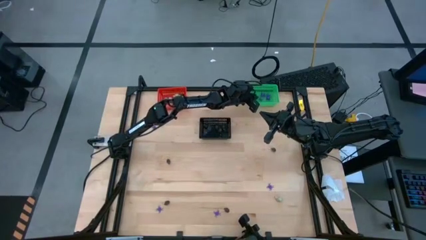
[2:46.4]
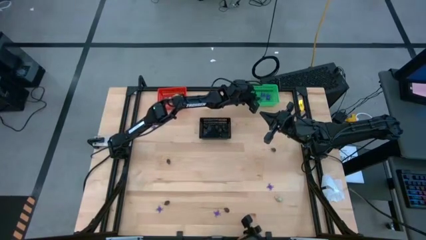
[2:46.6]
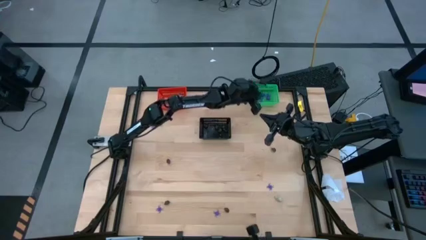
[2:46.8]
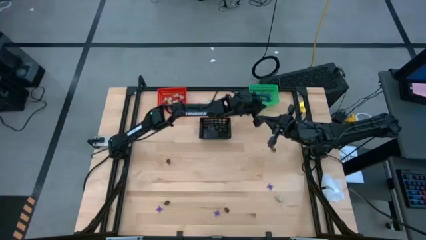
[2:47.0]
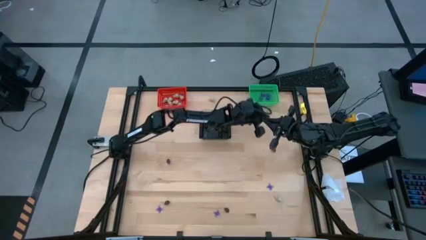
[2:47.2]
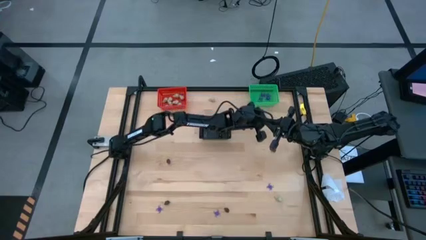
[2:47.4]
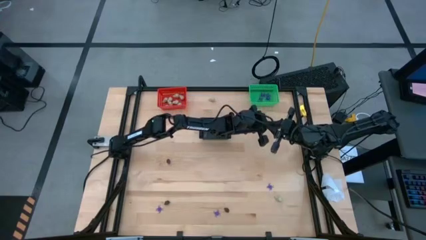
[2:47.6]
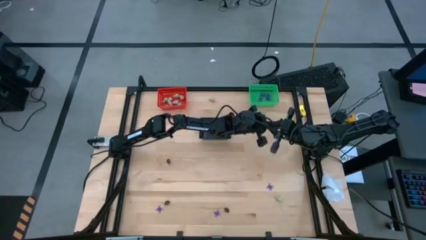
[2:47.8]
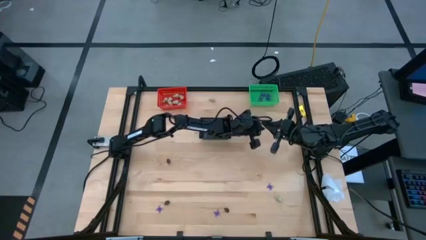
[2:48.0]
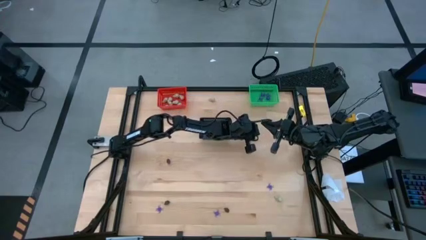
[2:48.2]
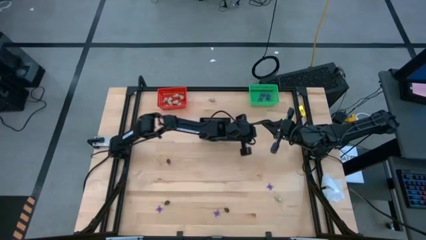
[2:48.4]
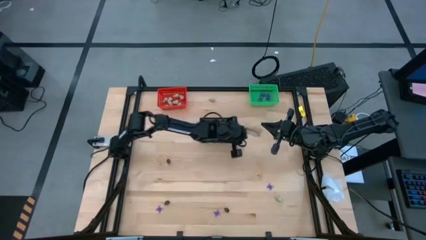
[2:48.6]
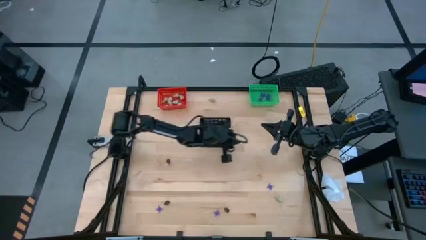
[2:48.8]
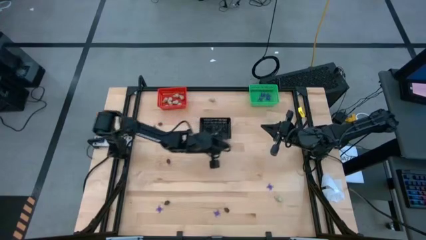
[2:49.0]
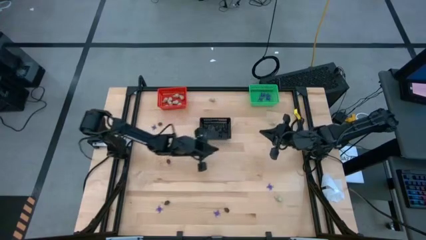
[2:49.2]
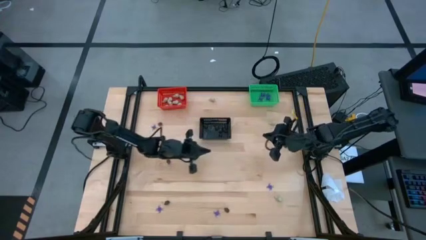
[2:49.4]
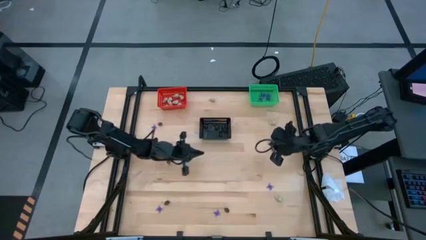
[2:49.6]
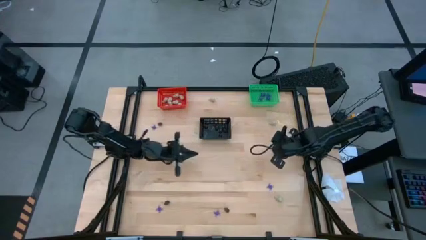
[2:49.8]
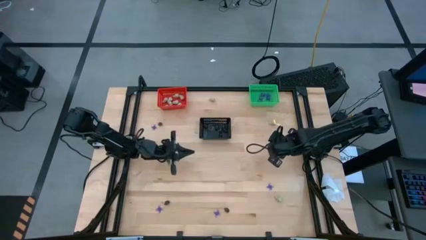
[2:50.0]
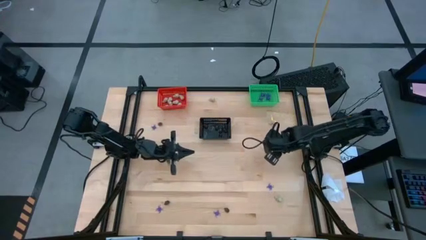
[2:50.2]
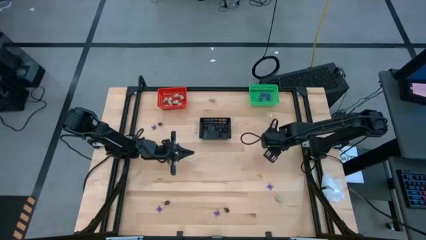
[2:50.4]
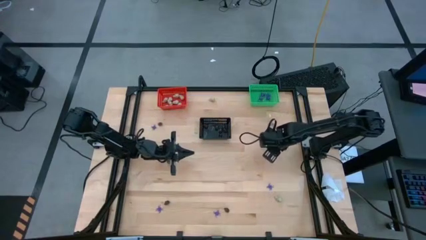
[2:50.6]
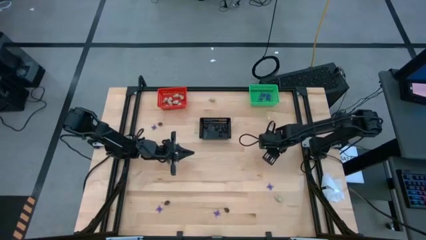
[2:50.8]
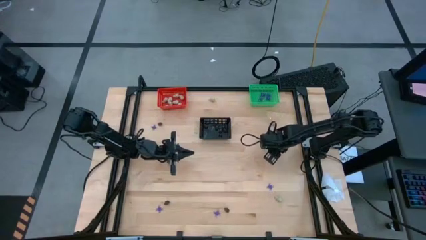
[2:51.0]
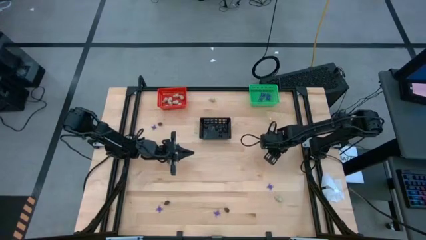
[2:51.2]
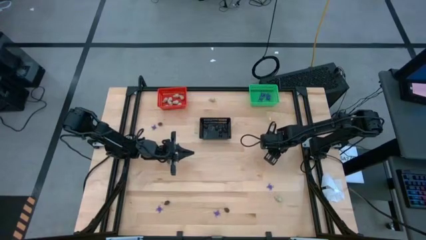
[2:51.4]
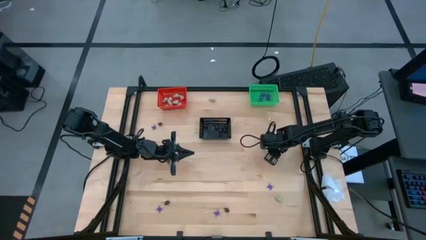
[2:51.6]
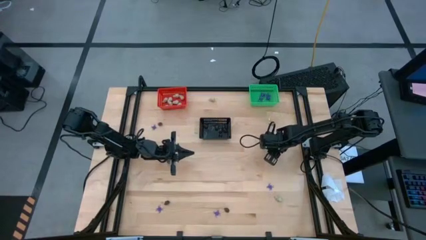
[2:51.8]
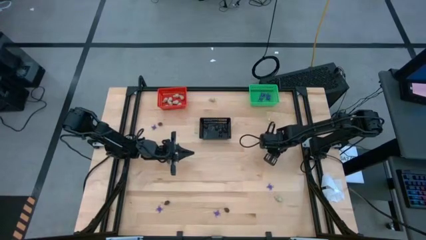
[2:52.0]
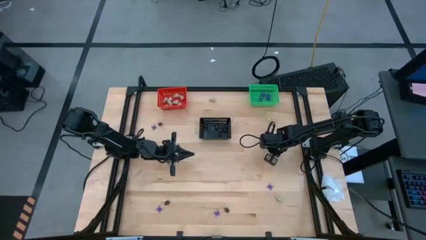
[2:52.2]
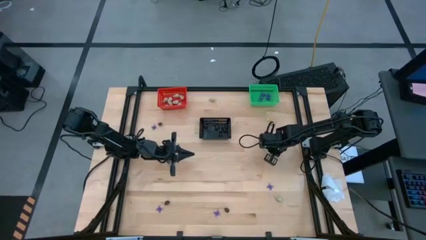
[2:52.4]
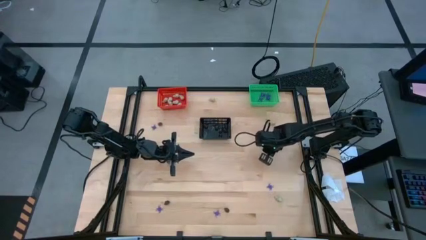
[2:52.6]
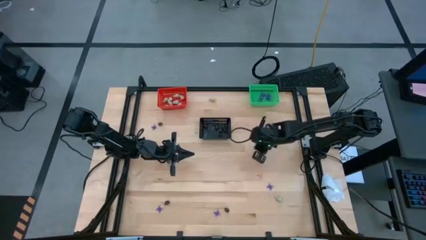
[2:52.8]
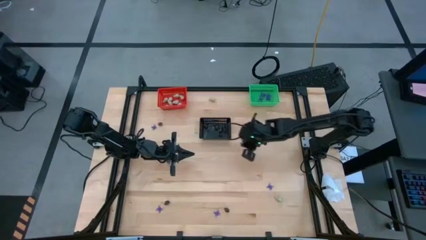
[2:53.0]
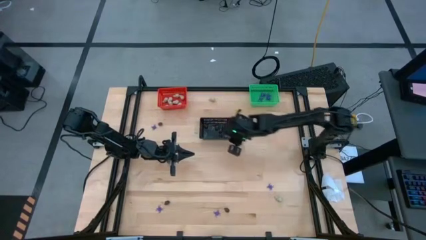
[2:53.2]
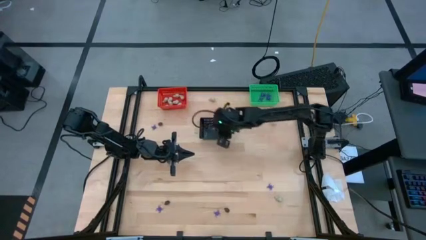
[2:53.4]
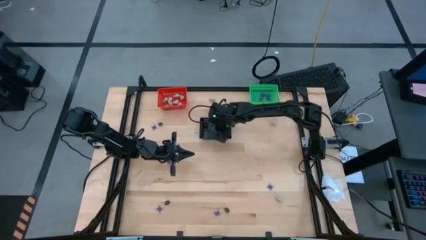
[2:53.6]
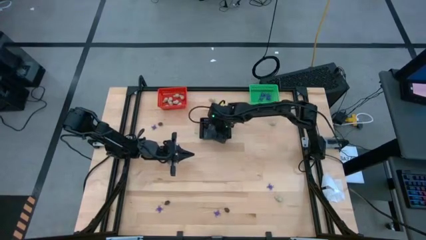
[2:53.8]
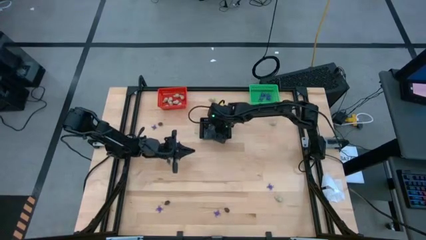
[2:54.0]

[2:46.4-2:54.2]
Task: Sort Halloween decoration
Put the black skull toy into the black bin

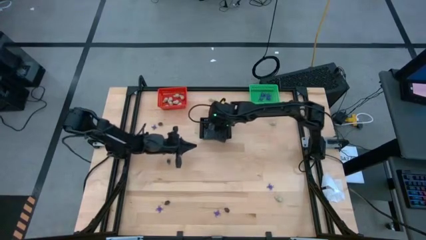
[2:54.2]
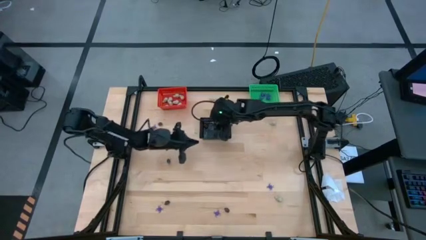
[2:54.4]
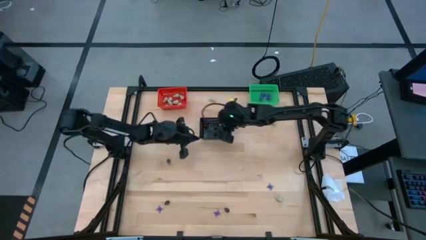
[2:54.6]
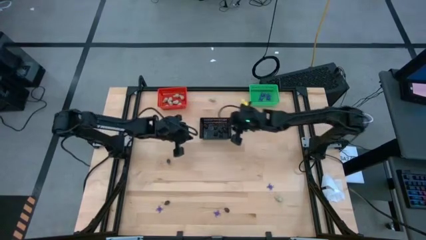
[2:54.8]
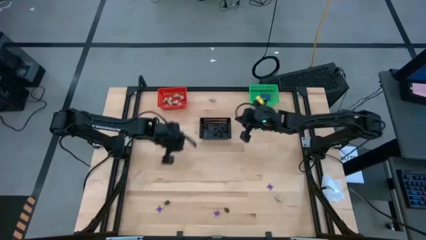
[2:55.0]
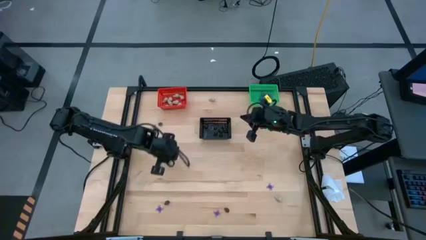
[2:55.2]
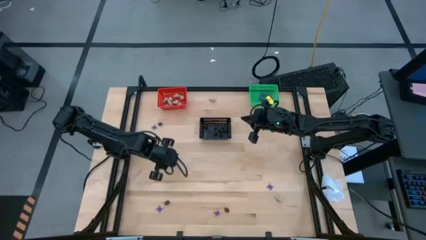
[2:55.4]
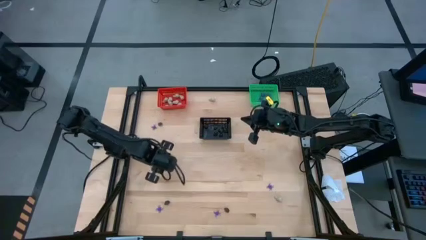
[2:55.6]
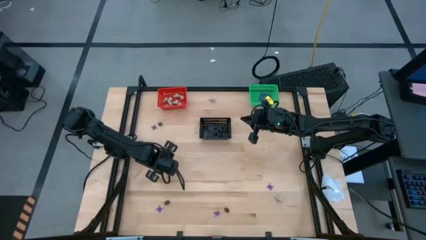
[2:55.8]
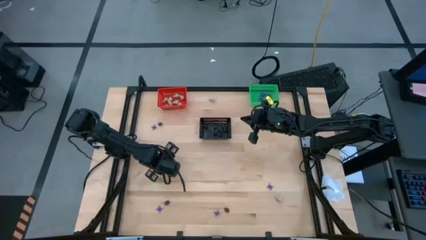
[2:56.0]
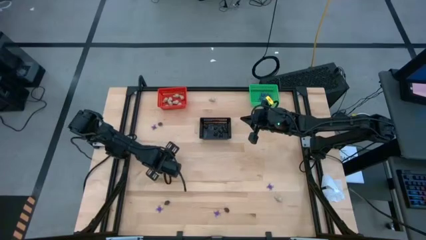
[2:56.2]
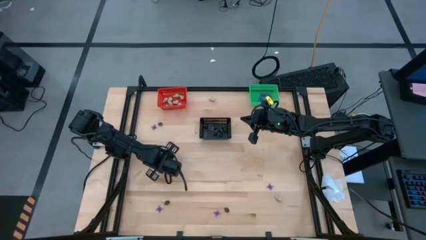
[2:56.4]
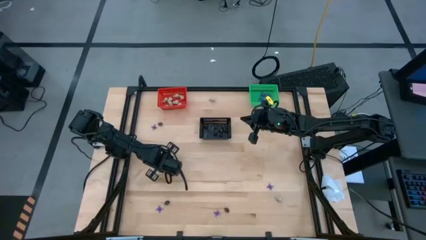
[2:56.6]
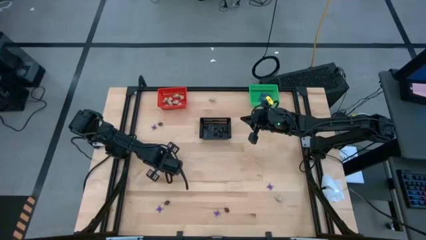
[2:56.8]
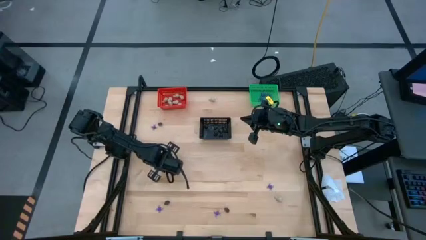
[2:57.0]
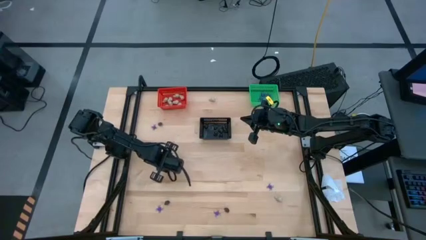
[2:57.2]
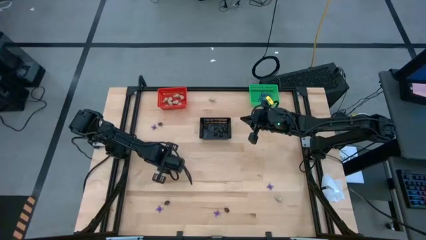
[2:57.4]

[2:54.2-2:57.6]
Put the black skull toy into the black bin

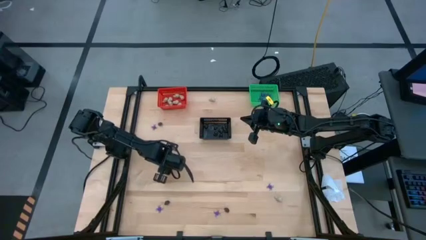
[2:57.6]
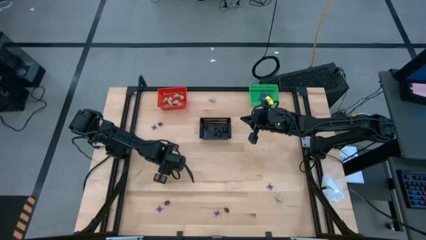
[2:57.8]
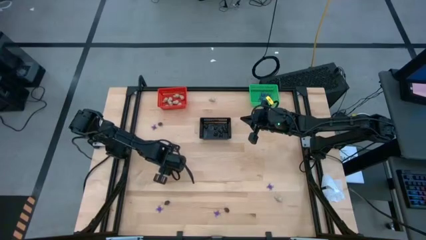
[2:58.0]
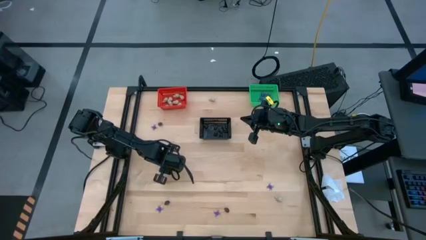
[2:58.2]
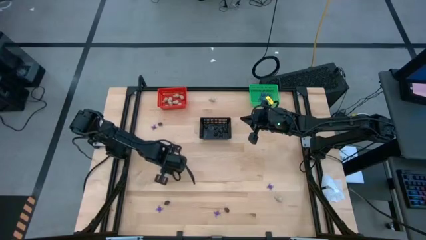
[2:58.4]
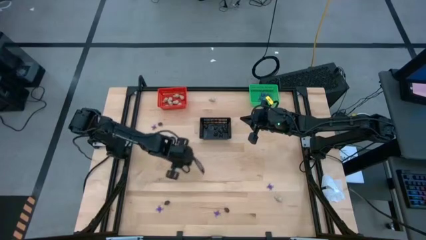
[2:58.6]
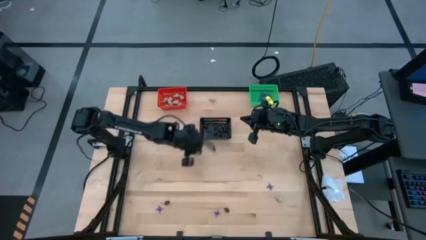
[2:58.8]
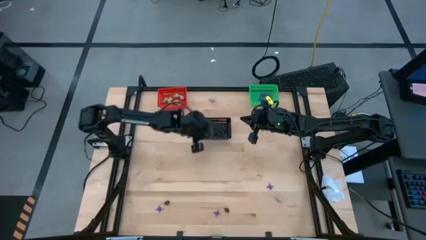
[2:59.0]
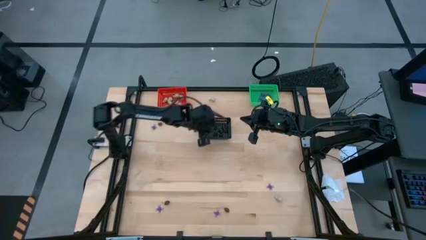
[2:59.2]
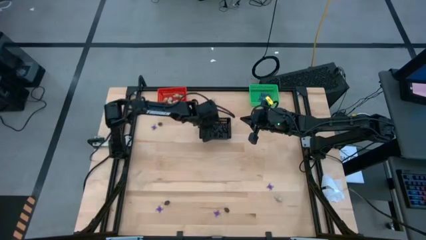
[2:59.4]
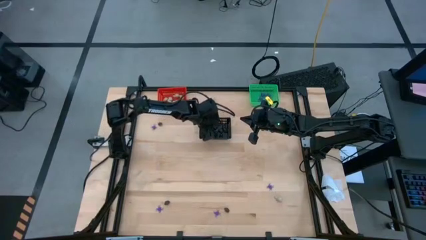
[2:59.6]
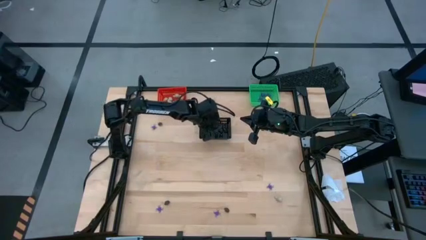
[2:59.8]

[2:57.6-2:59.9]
Put the black skull toy into the black bin
